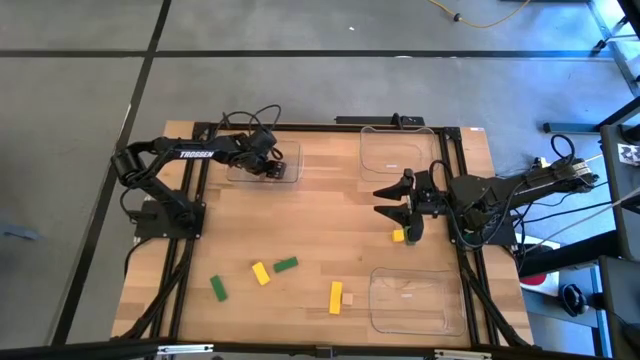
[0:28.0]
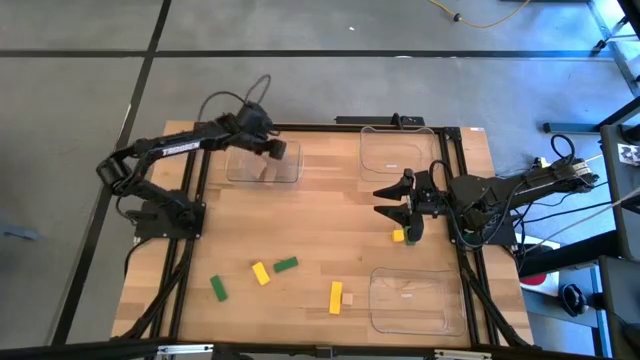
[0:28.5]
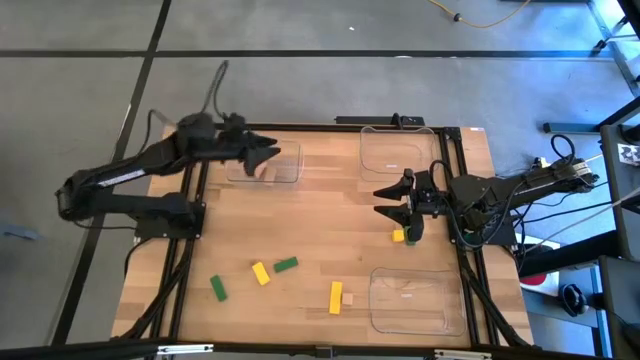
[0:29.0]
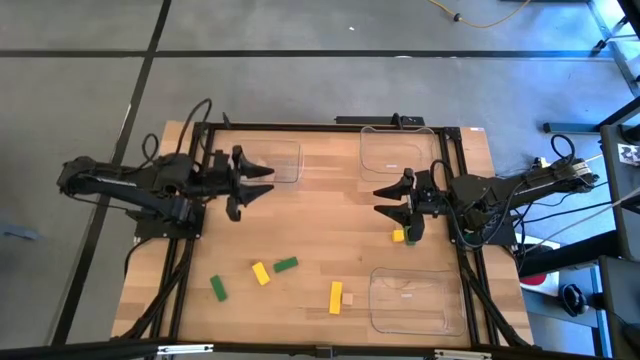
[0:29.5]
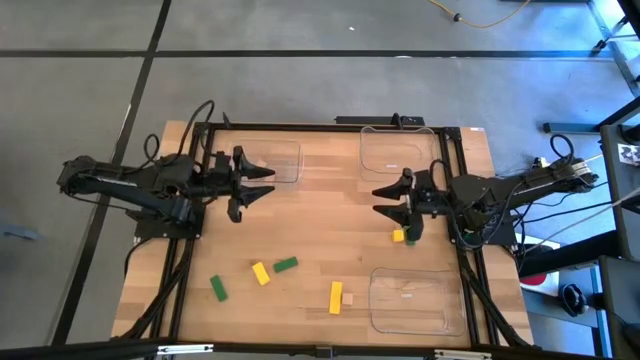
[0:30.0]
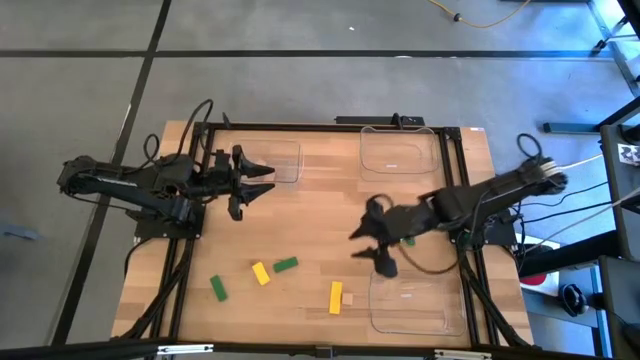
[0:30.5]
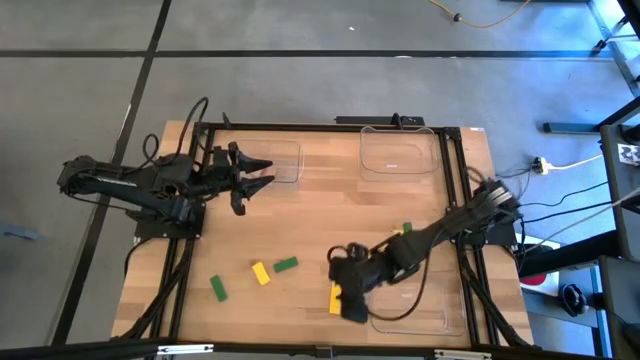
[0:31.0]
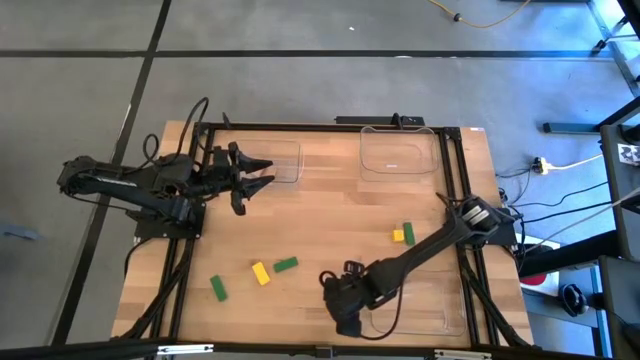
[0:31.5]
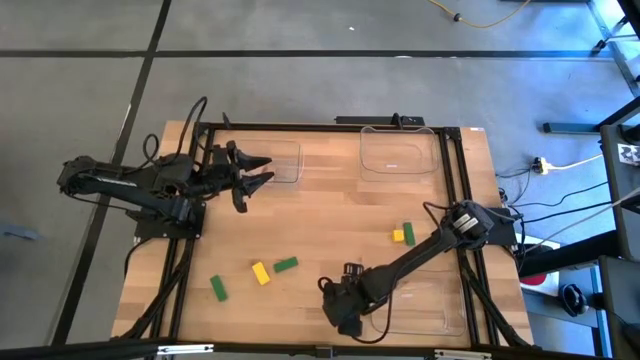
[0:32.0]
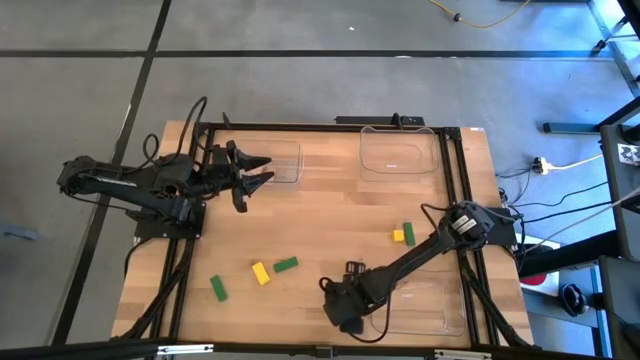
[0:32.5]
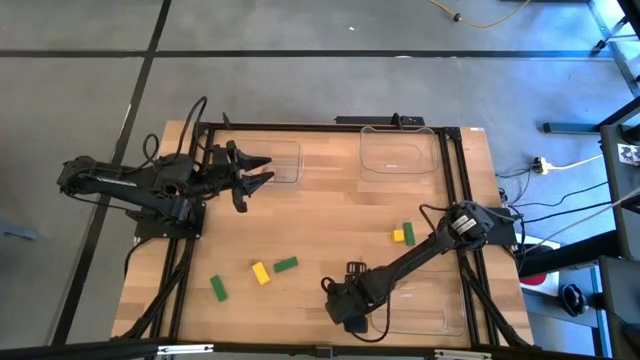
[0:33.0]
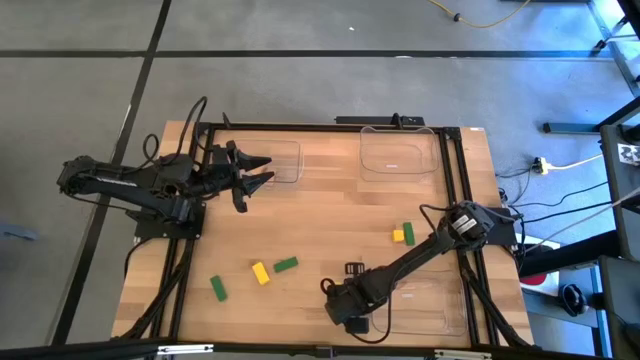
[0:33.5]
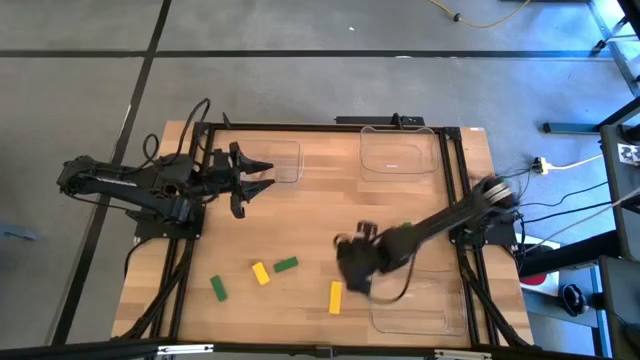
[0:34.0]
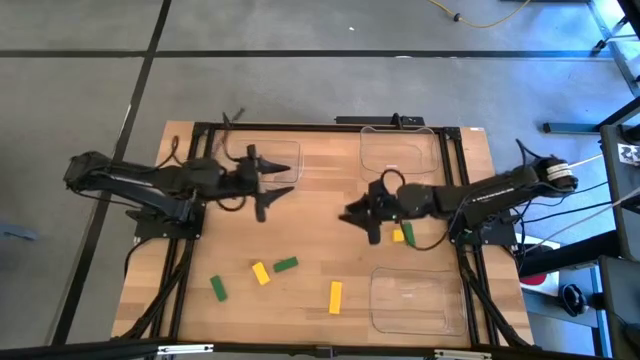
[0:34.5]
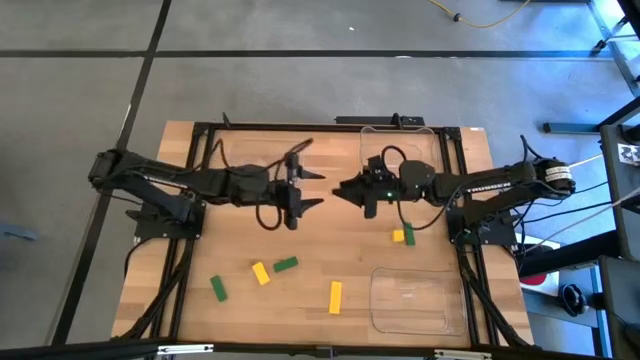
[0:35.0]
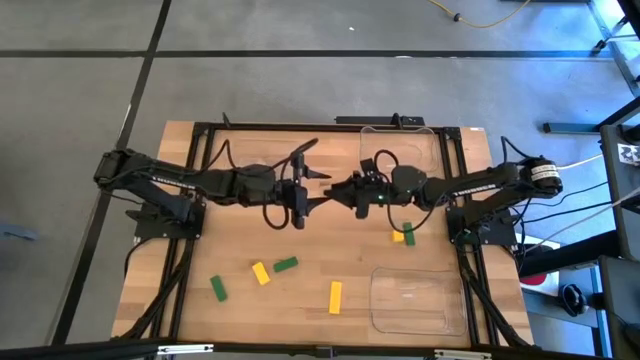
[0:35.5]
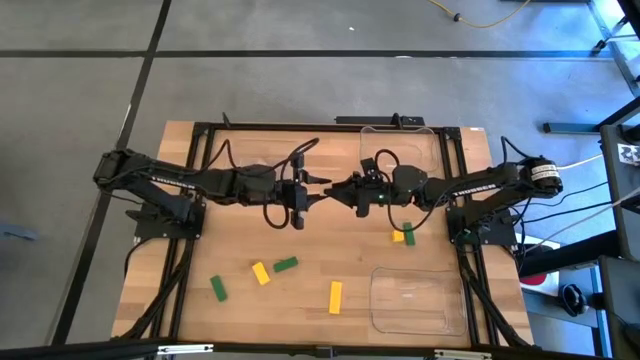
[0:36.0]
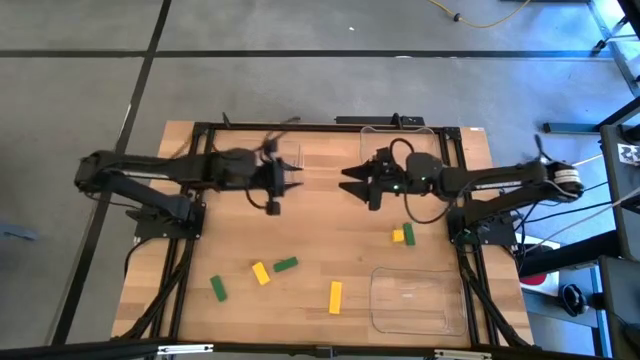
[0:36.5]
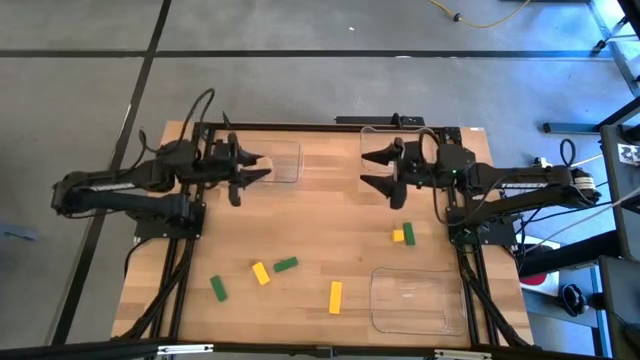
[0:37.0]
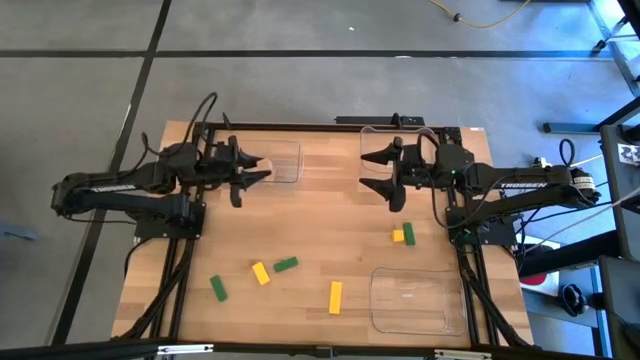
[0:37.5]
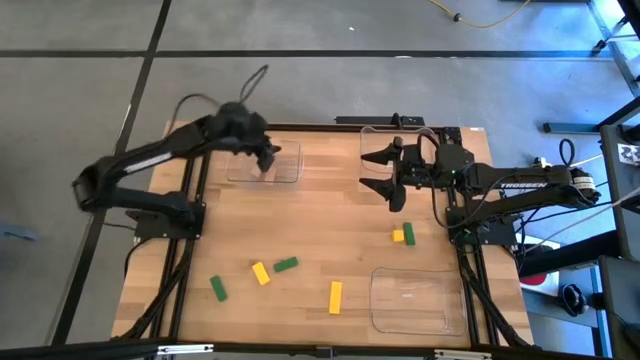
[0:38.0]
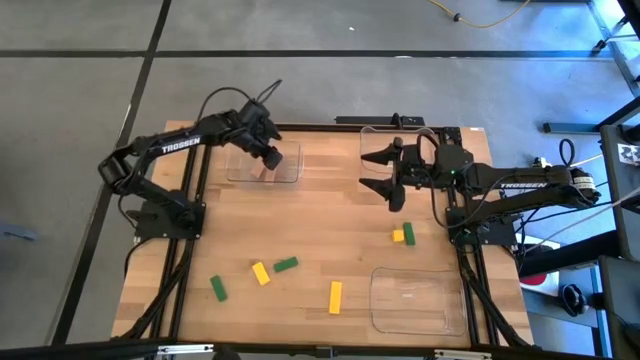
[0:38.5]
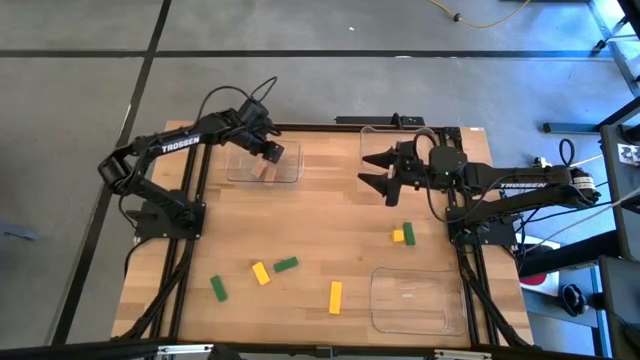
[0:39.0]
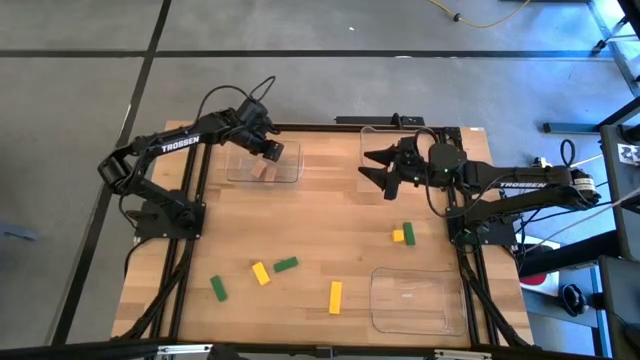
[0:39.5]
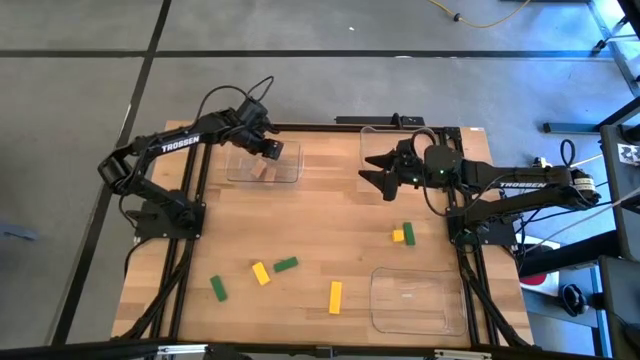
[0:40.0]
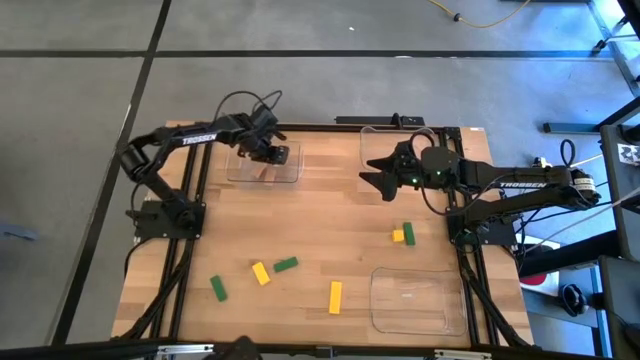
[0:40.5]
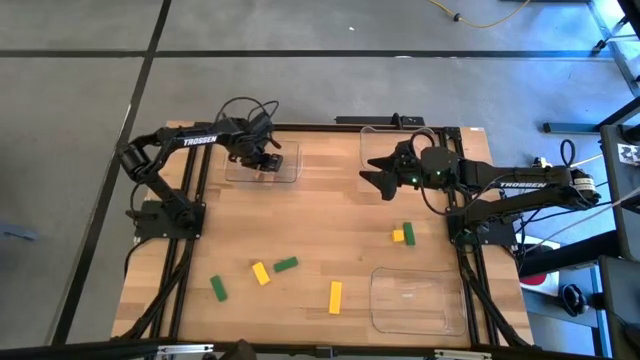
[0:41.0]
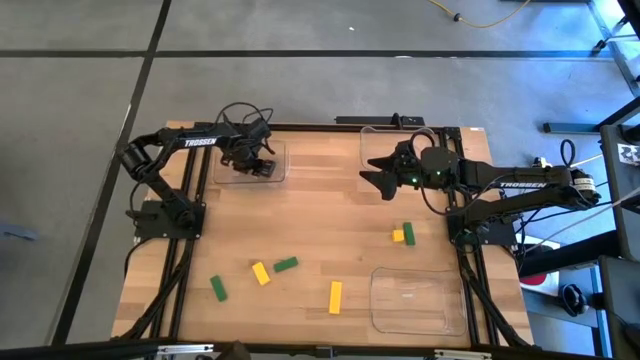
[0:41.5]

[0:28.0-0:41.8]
Task: Sort & place blocks by color
Put the brown block into the top left transparent bin

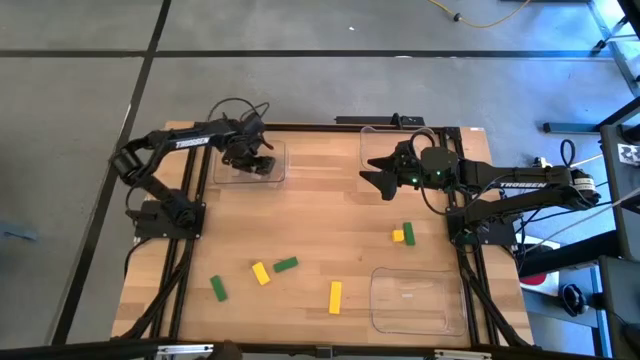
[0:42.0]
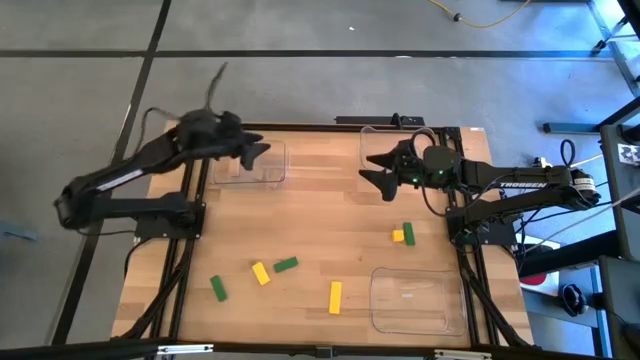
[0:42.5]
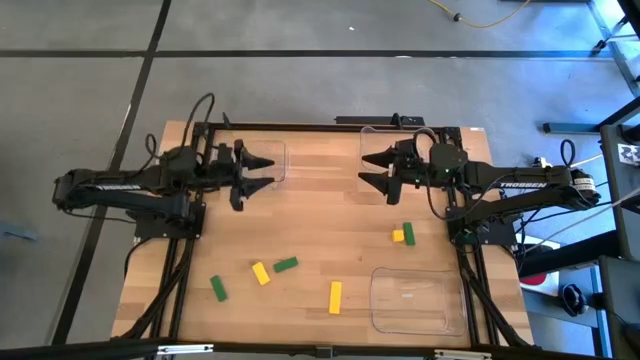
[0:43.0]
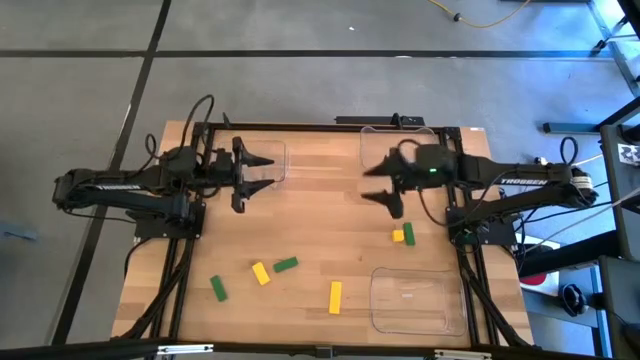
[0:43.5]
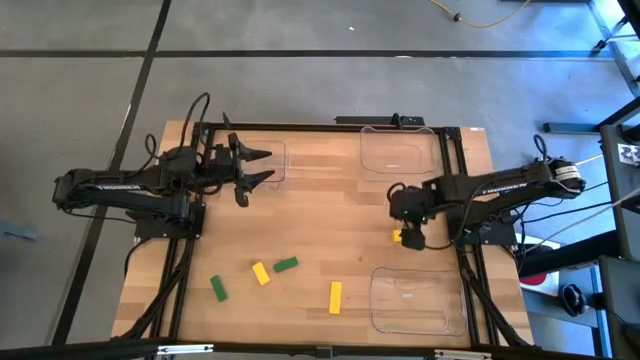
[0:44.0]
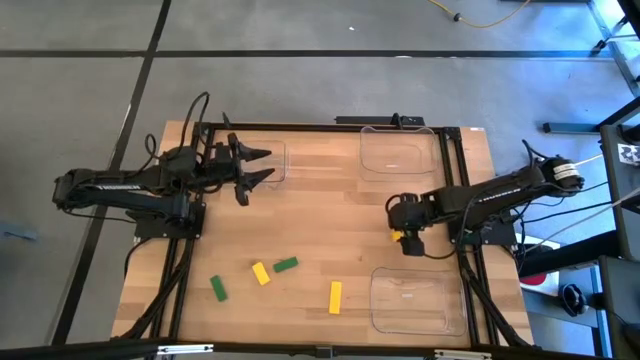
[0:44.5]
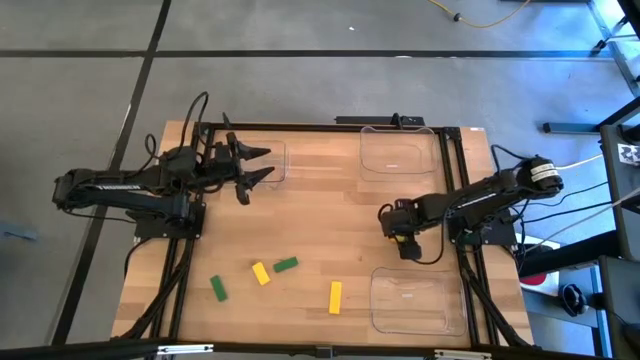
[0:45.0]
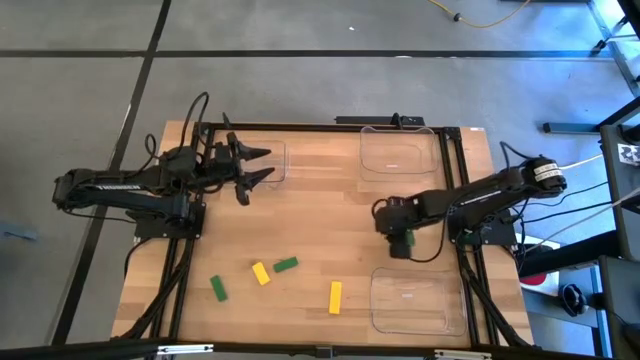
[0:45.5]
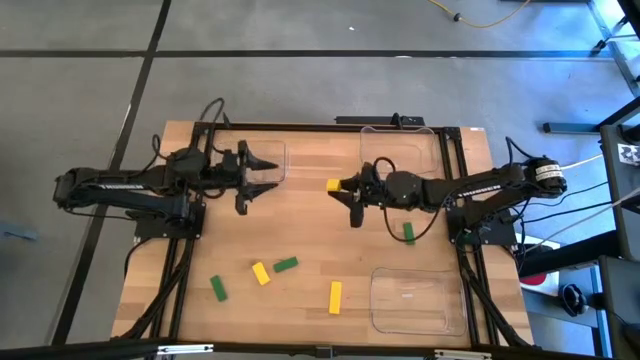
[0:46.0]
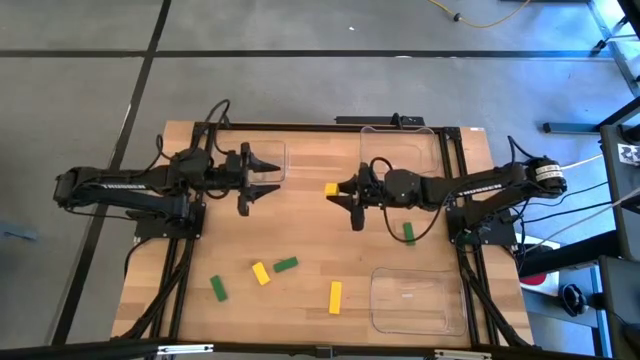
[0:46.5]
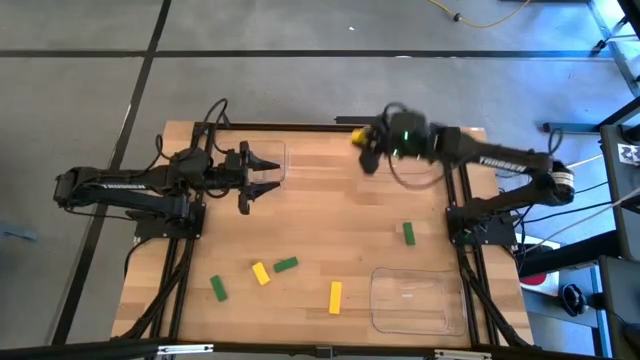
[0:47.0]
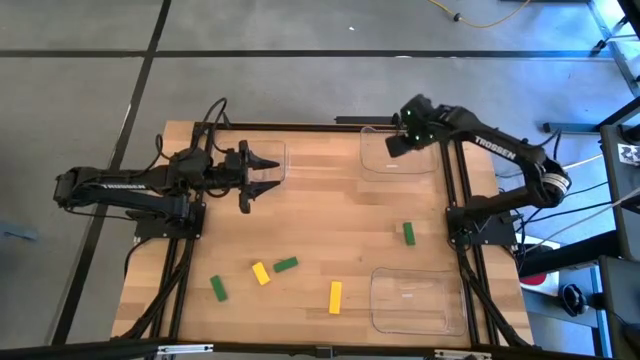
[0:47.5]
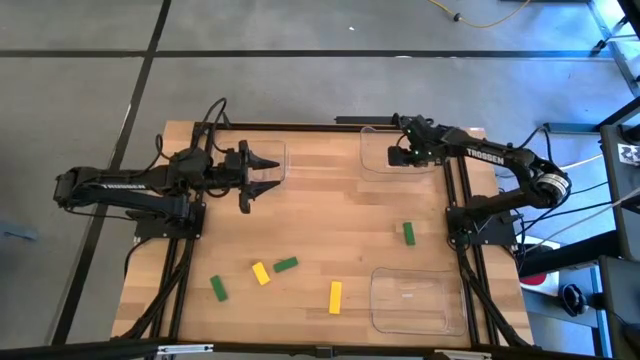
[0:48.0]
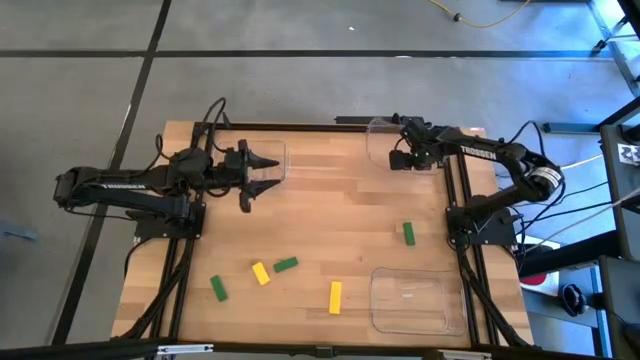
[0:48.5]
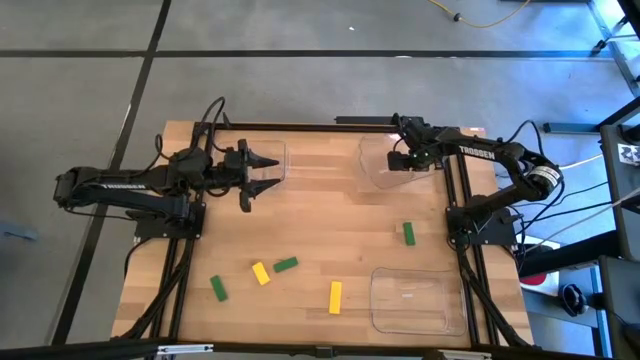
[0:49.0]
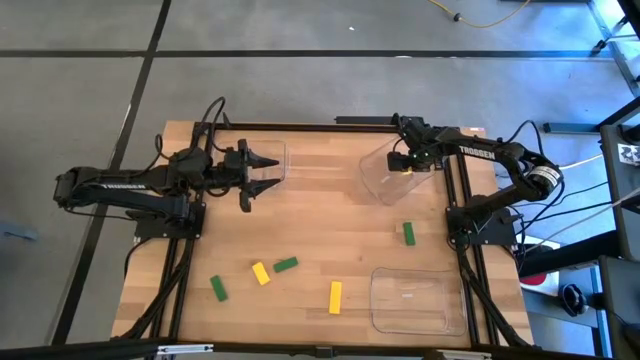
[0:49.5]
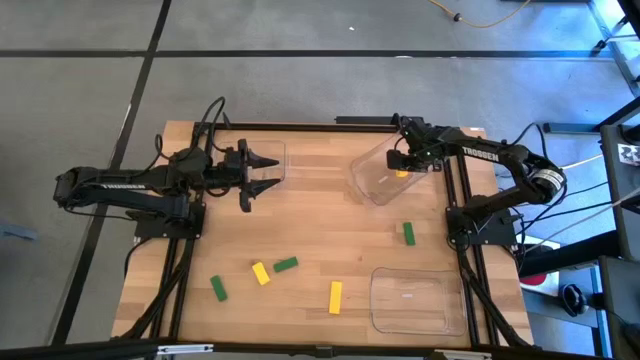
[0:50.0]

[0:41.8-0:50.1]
Put the top yellow block into the top right transparent bin
